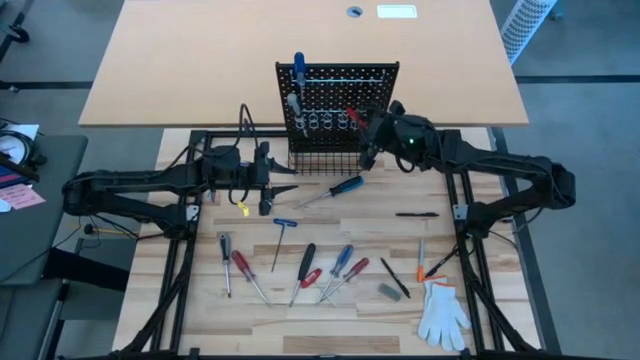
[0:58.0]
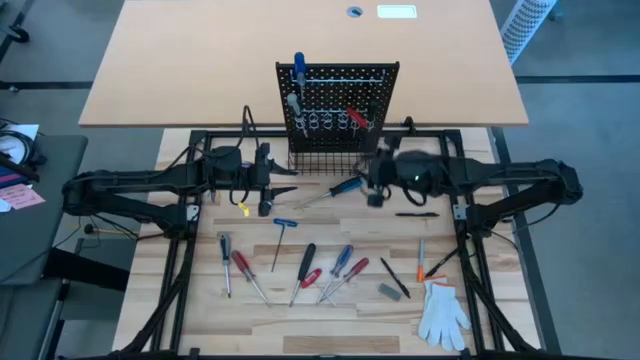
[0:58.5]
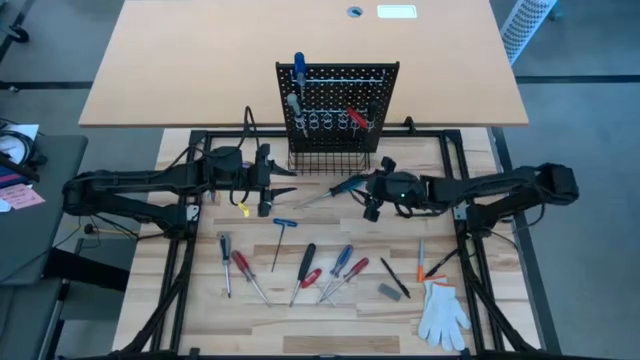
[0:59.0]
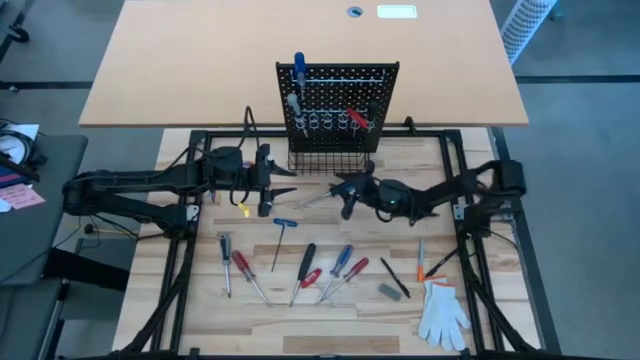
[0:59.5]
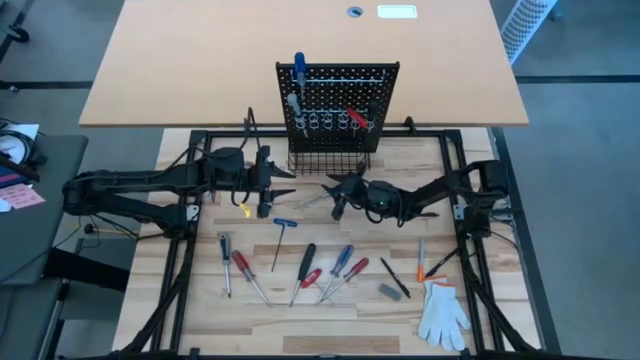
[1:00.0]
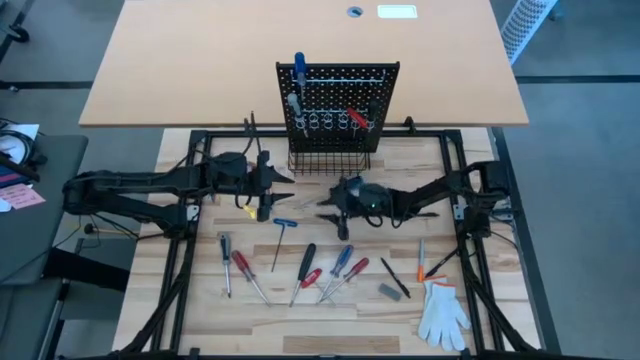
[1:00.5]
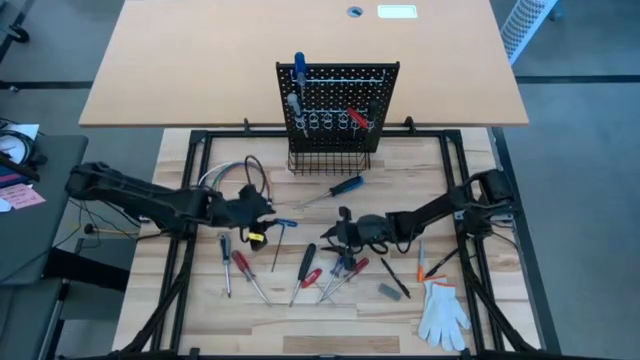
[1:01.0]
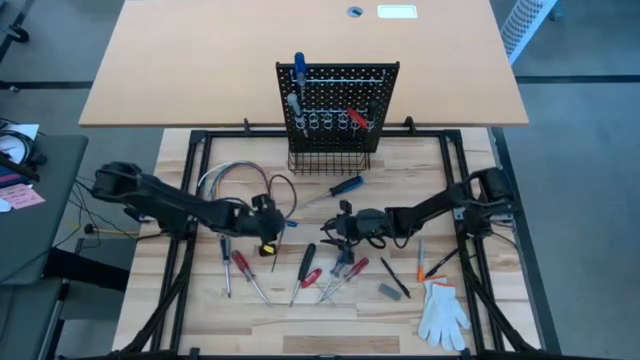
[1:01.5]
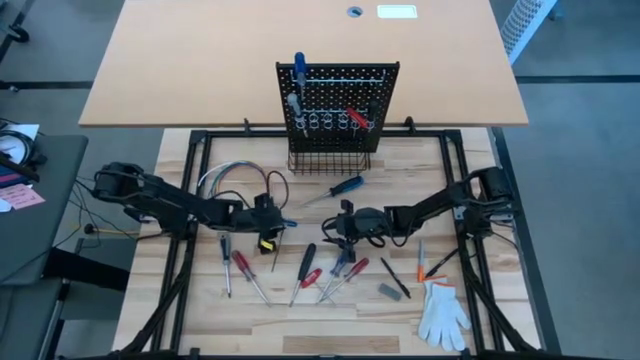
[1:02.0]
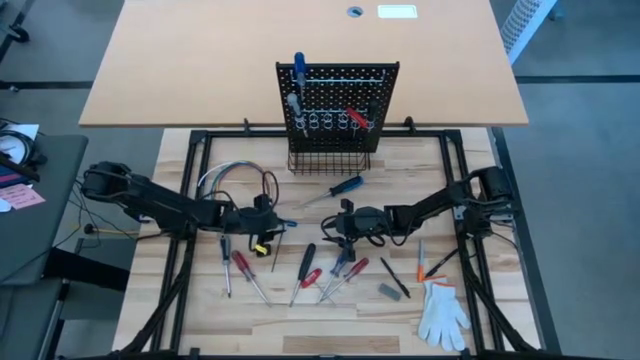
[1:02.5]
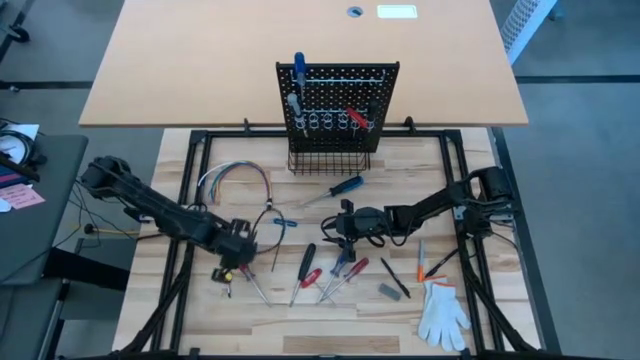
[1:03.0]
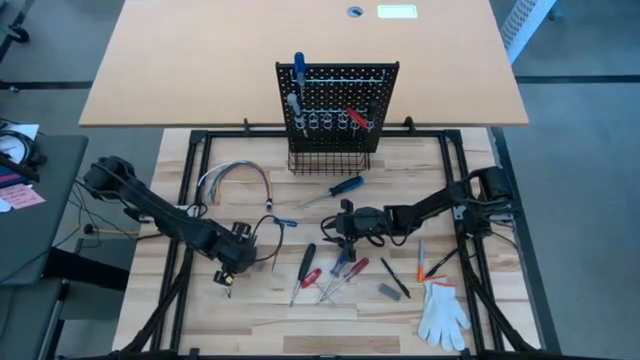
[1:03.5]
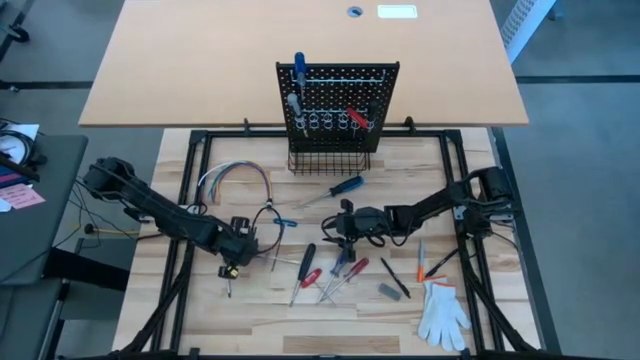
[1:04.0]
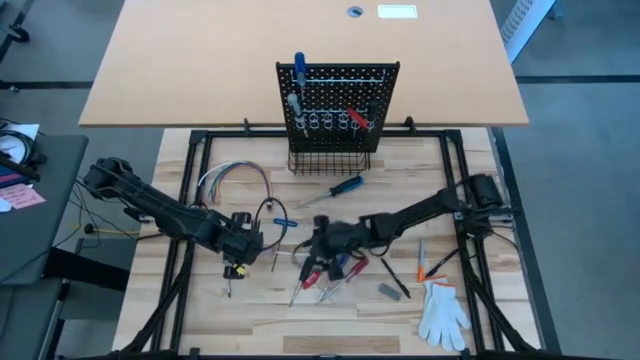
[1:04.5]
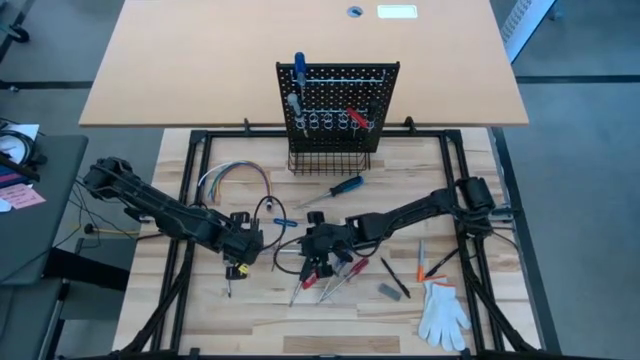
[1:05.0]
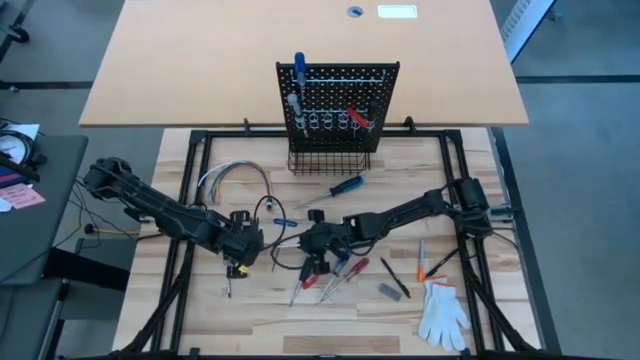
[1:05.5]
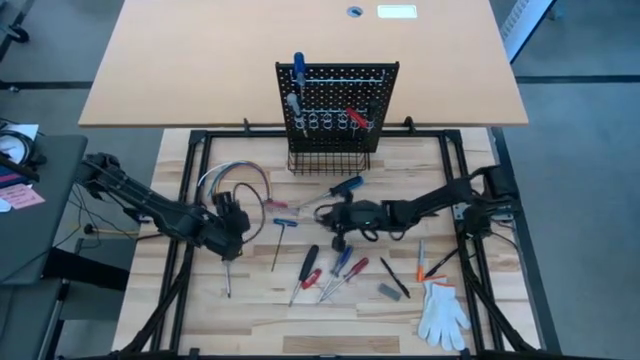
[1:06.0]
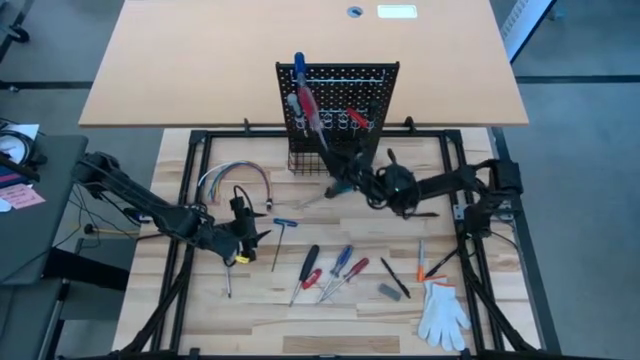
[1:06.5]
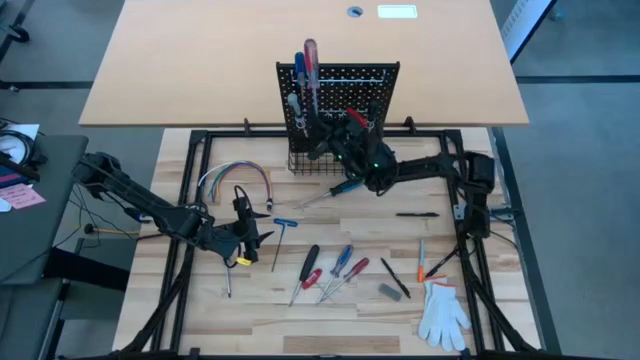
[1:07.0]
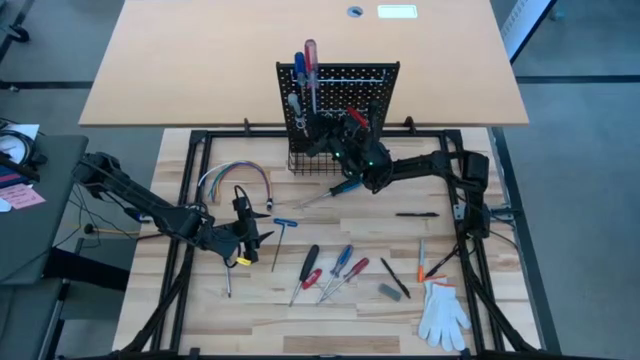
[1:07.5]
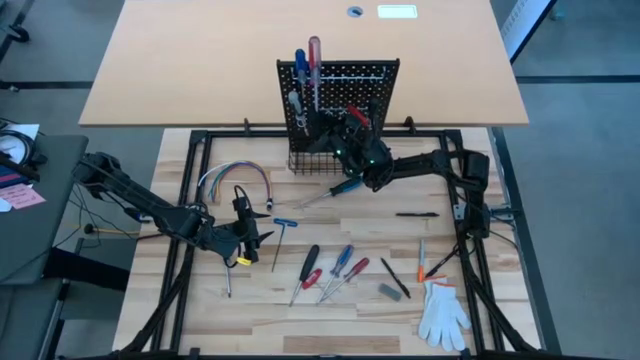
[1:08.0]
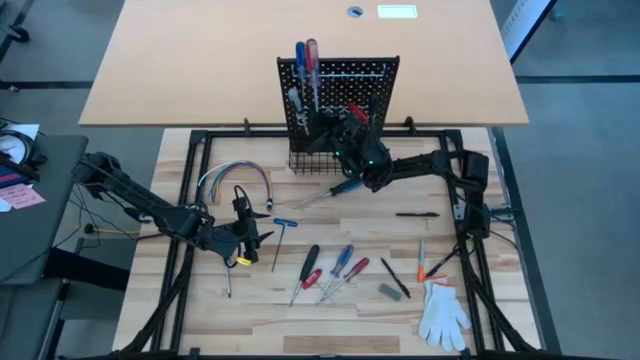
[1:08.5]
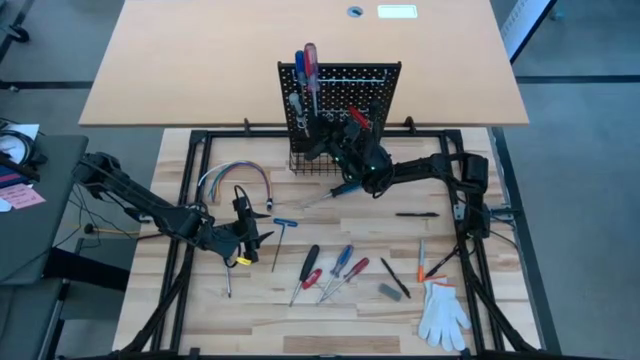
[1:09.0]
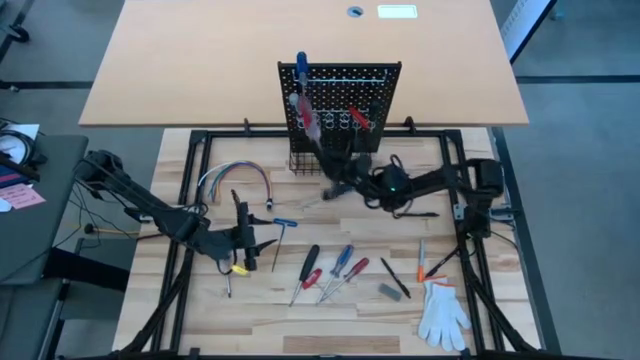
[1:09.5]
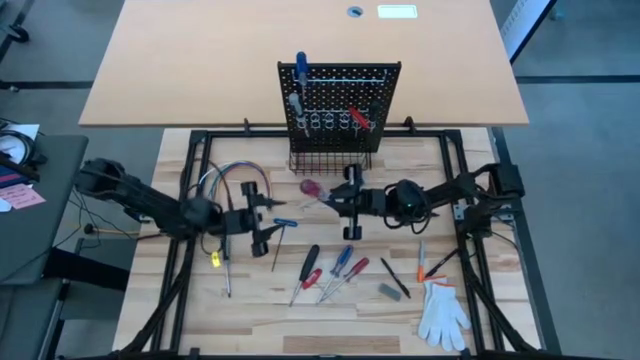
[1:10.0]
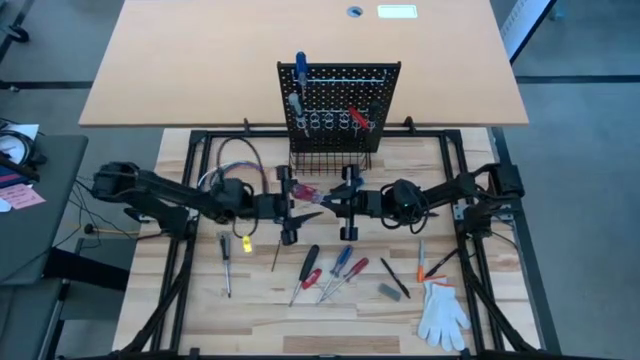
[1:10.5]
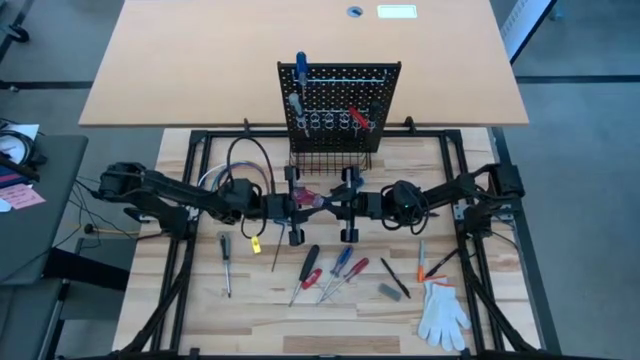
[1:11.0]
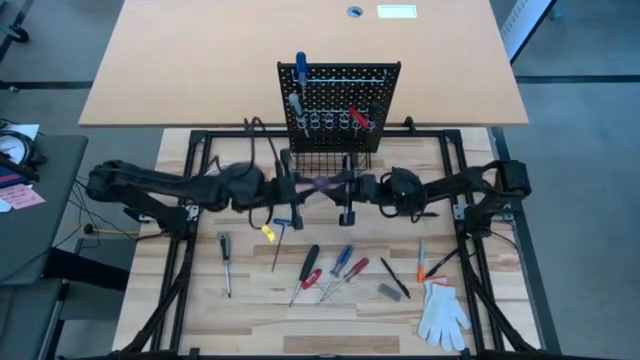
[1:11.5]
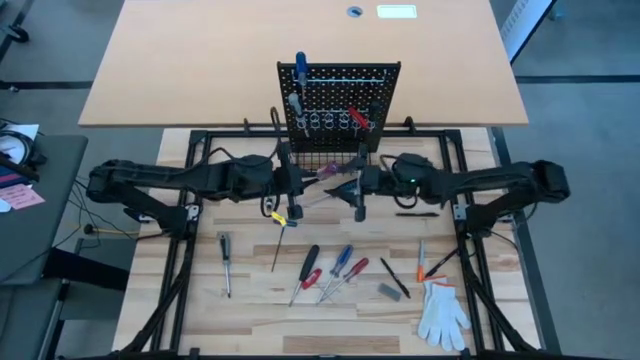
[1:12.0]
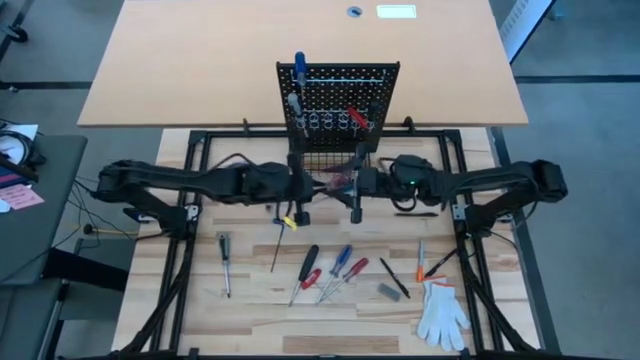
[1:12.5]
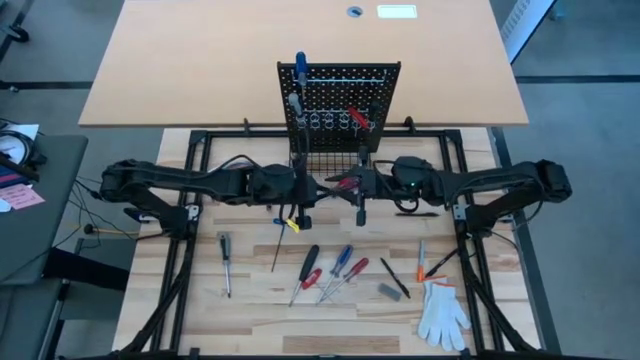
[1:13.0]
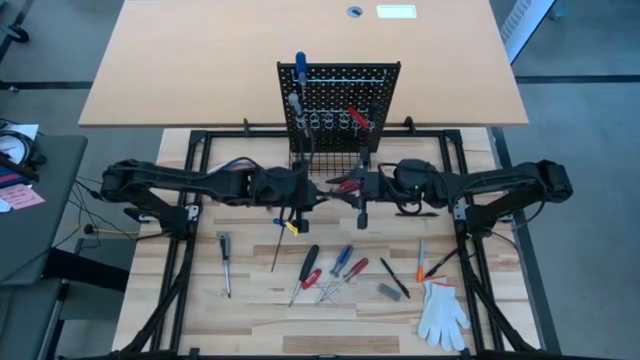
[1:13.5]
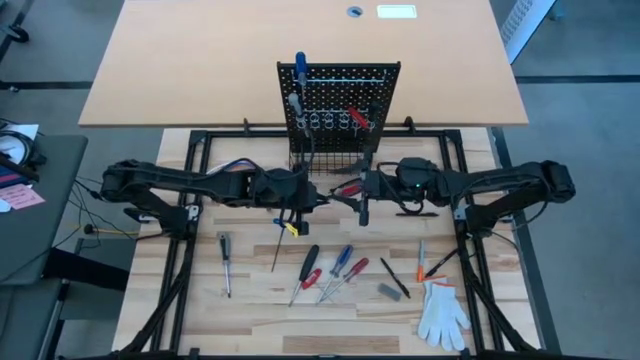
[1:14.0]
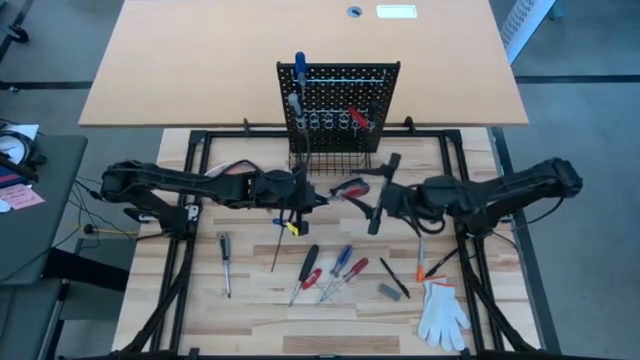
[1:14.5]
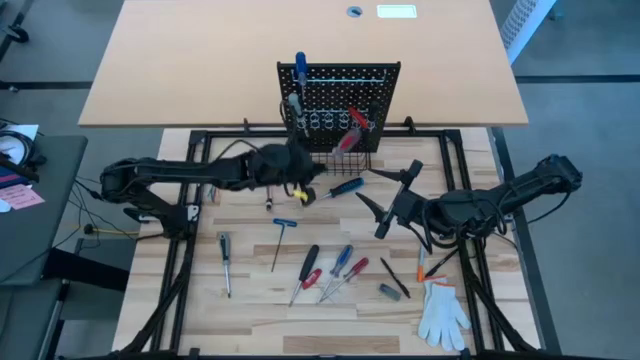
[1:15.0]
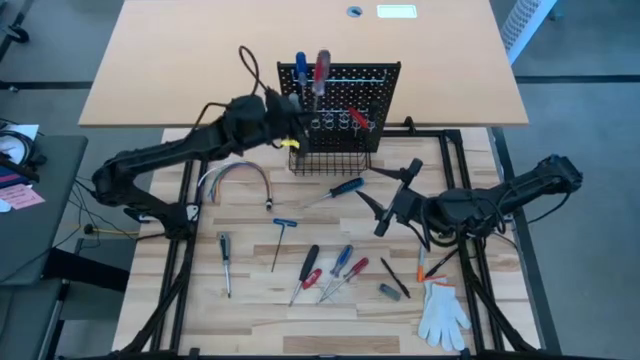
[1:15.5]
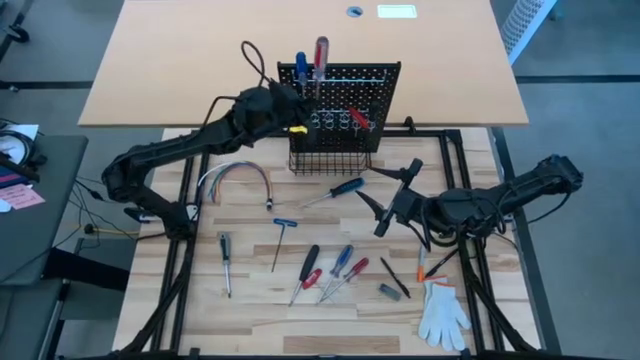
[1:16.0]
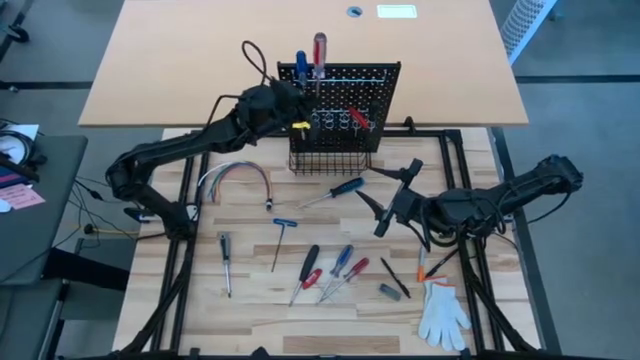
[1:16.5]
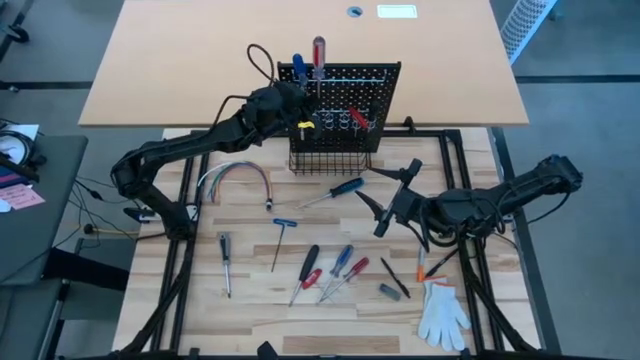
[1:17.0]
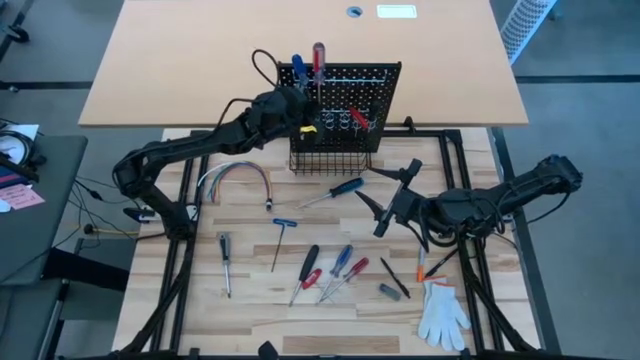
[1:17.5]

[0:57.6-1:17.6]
Task: Hang tools onto peg board
Hang the left red transparent screwdriver on the black peg board

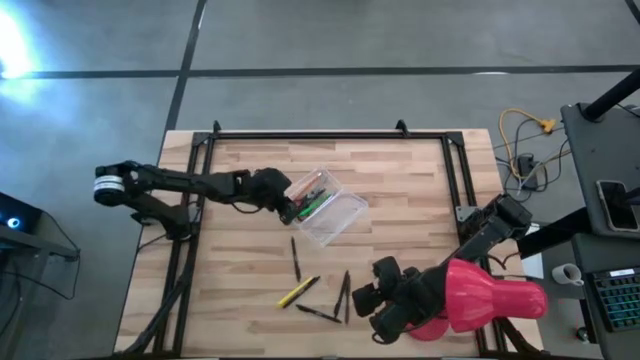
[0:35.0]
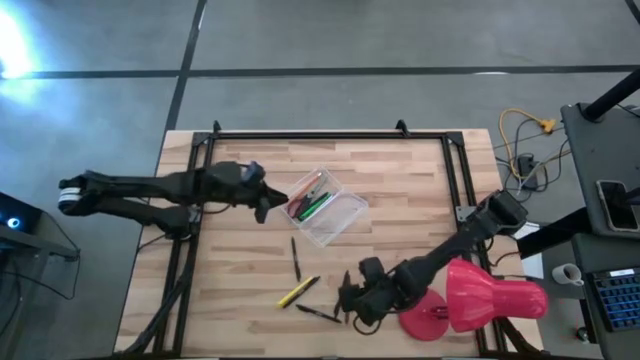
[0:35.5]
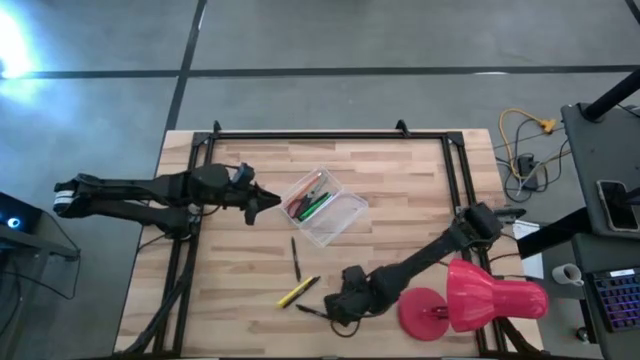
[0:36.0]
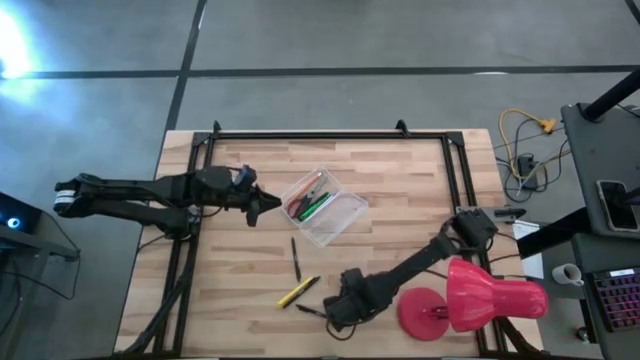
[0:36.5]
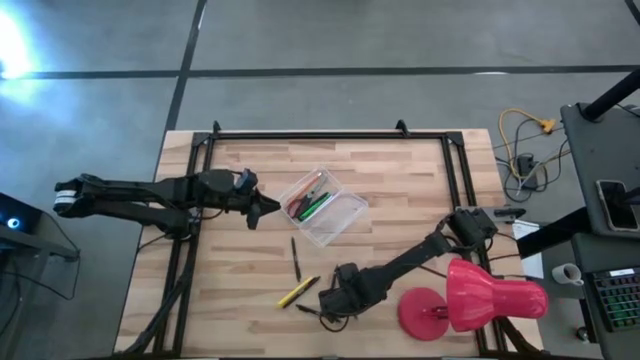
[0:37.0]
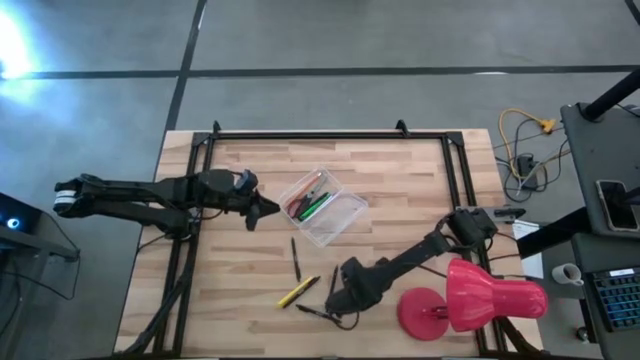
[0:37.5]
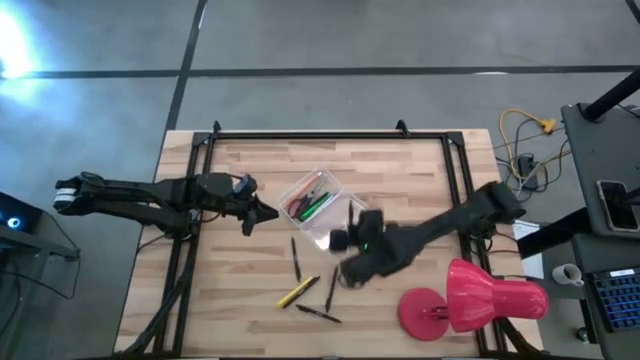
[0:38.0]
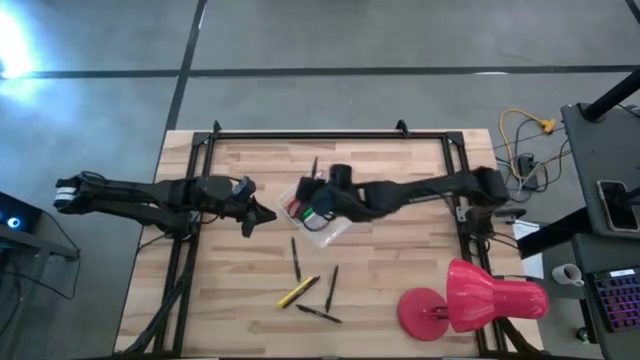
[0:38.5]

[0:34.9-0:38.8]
Task: Pick & place school supplies into a supply box
Put the brown pen into the transparent supply box
